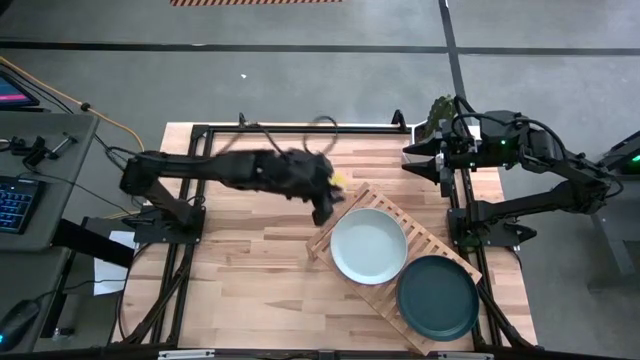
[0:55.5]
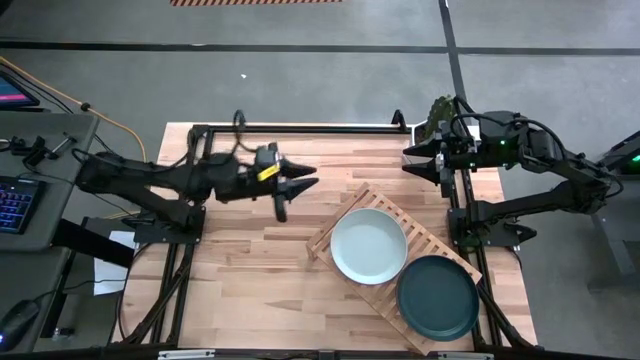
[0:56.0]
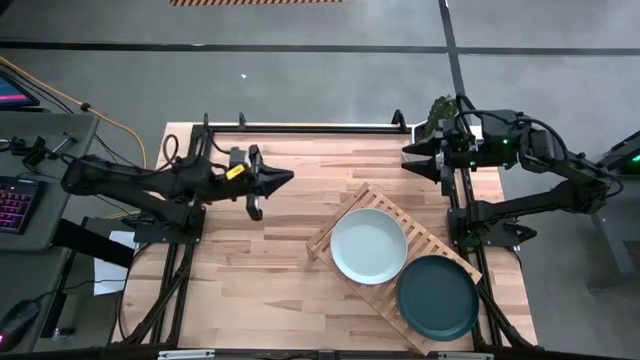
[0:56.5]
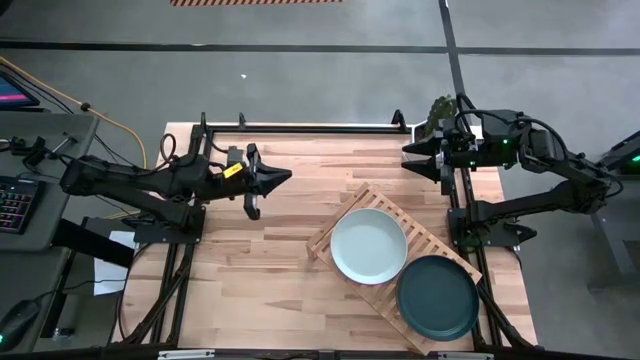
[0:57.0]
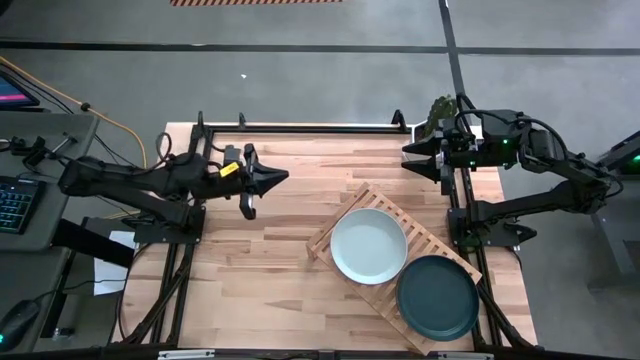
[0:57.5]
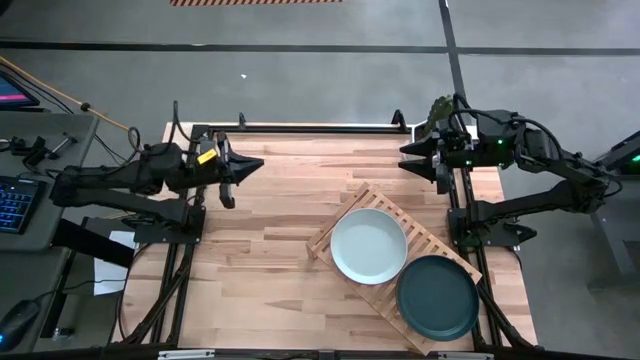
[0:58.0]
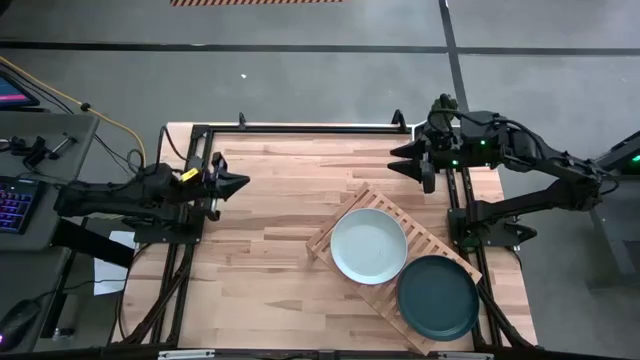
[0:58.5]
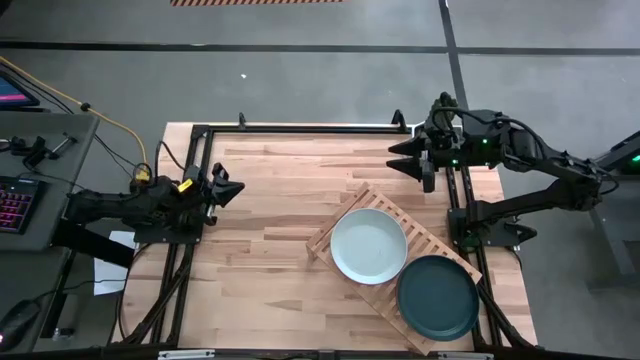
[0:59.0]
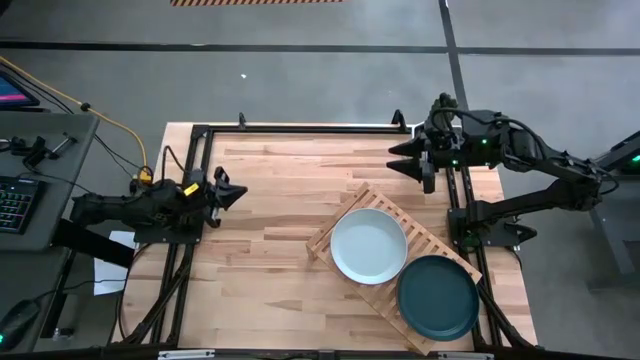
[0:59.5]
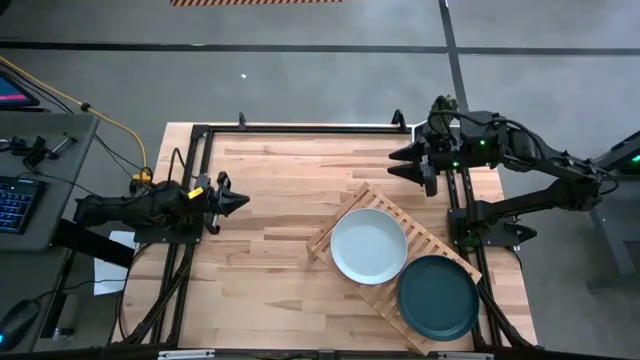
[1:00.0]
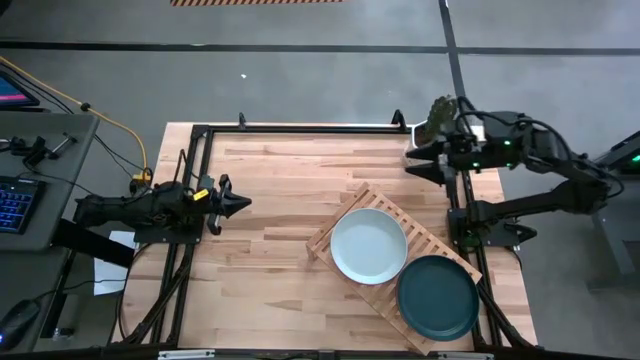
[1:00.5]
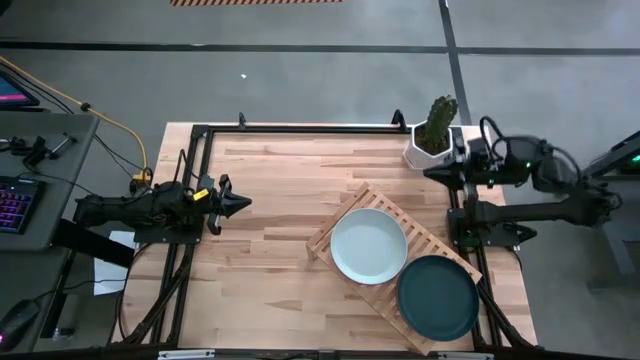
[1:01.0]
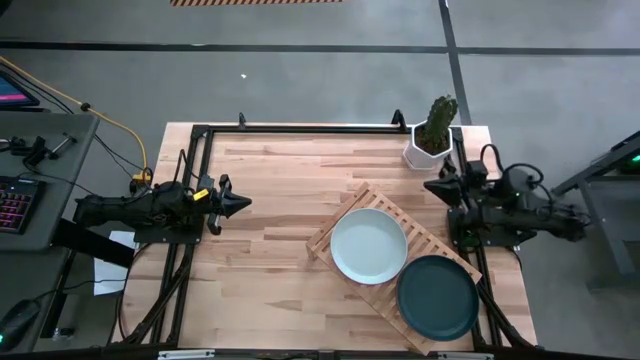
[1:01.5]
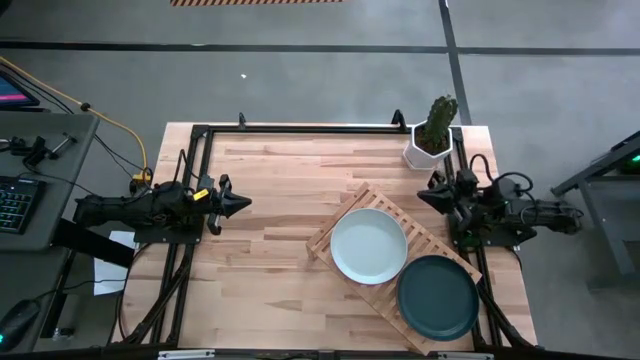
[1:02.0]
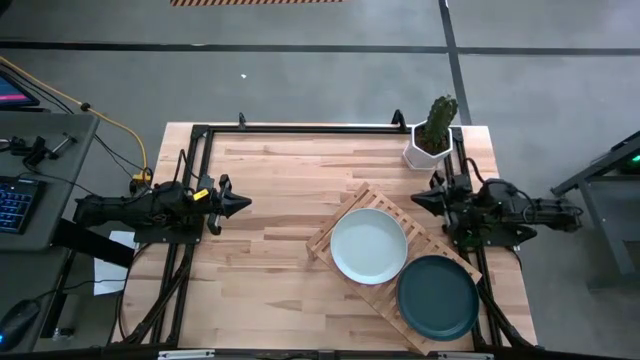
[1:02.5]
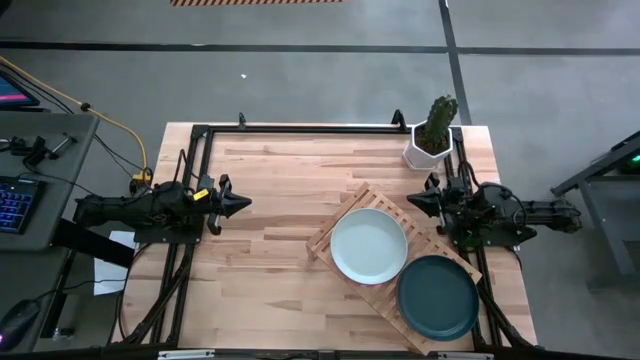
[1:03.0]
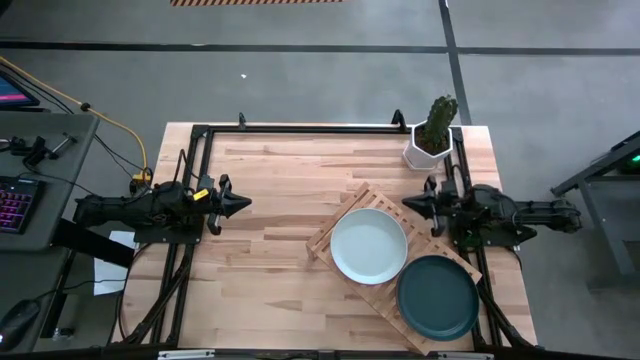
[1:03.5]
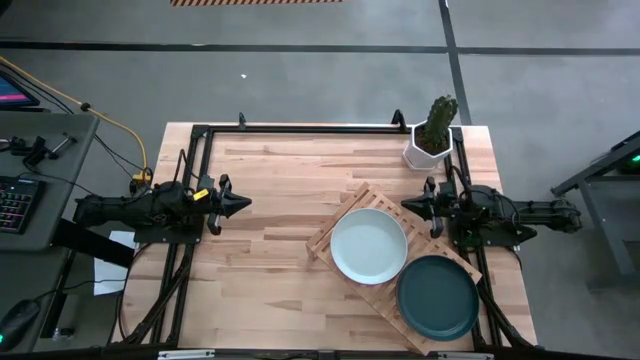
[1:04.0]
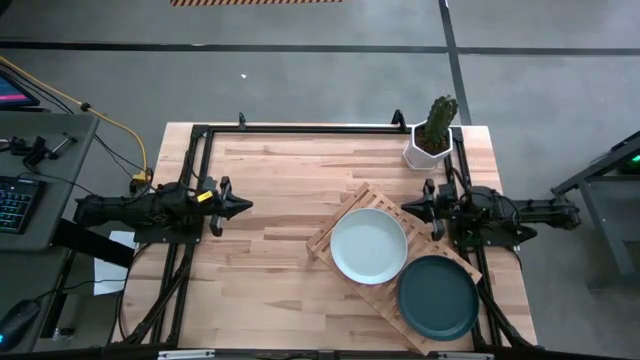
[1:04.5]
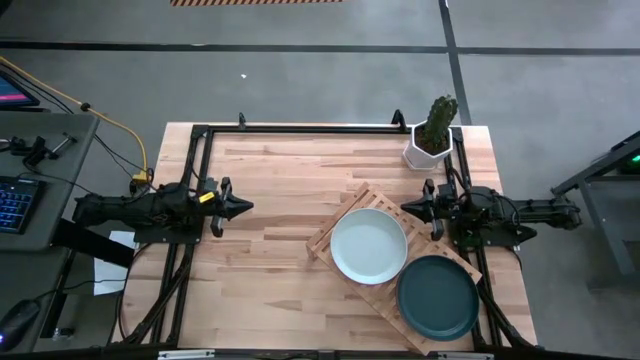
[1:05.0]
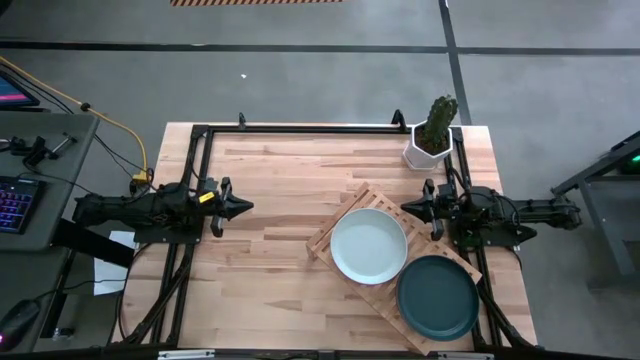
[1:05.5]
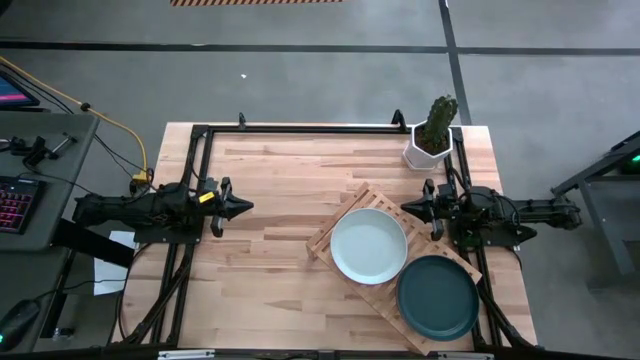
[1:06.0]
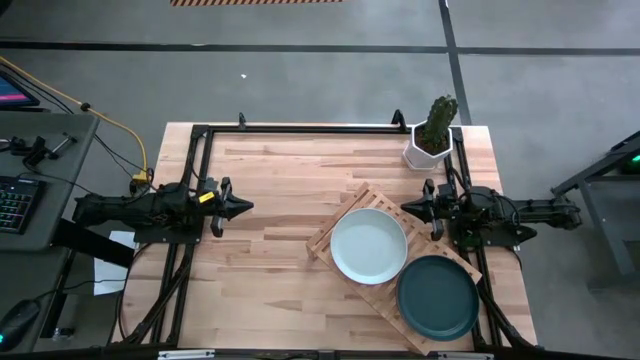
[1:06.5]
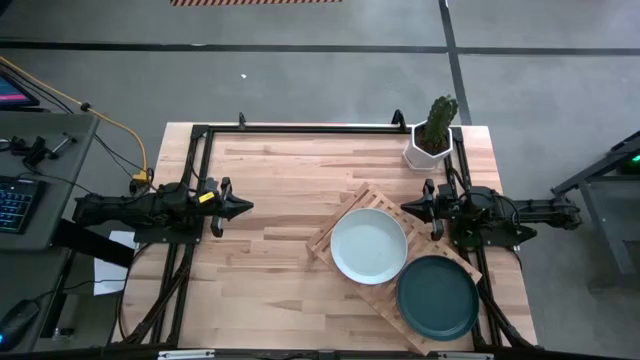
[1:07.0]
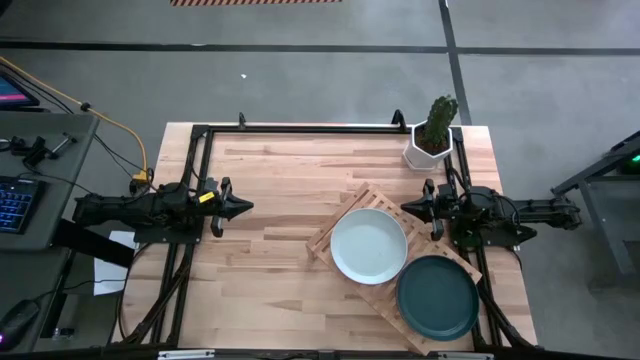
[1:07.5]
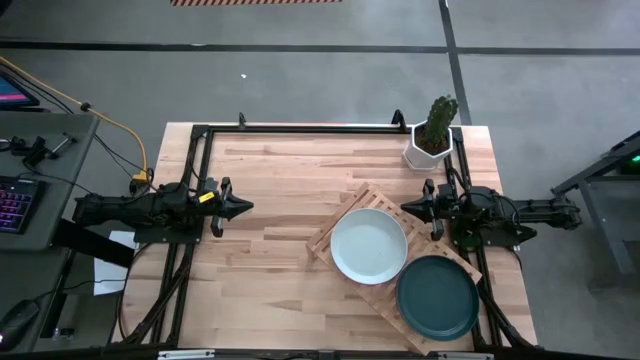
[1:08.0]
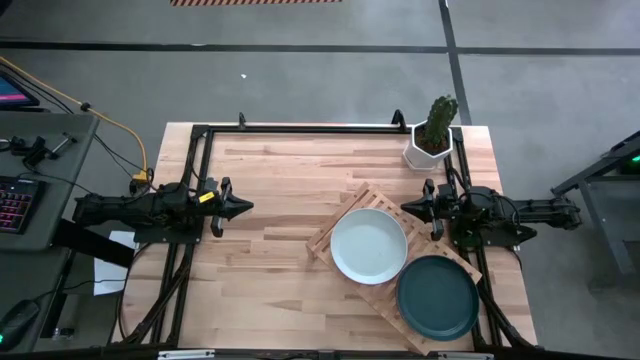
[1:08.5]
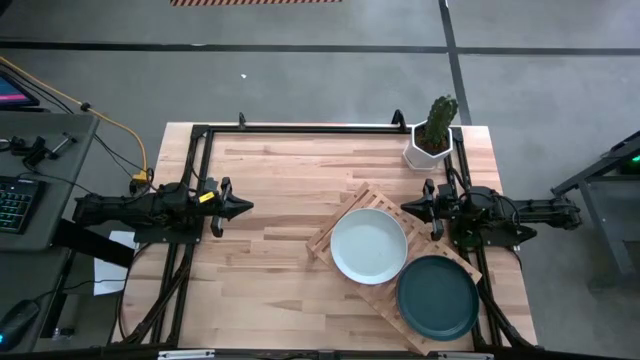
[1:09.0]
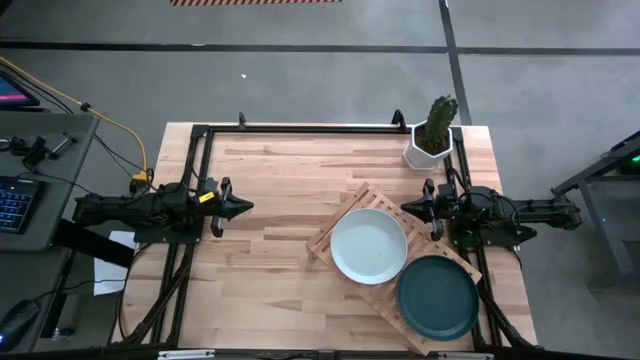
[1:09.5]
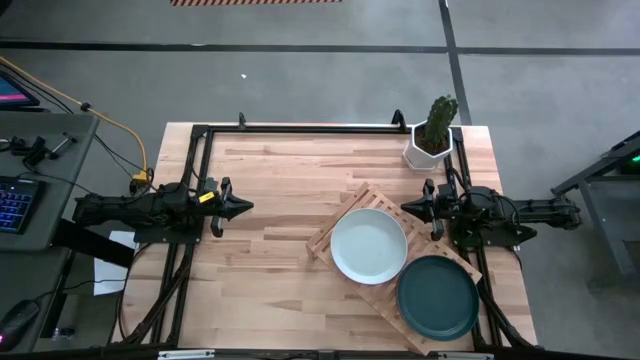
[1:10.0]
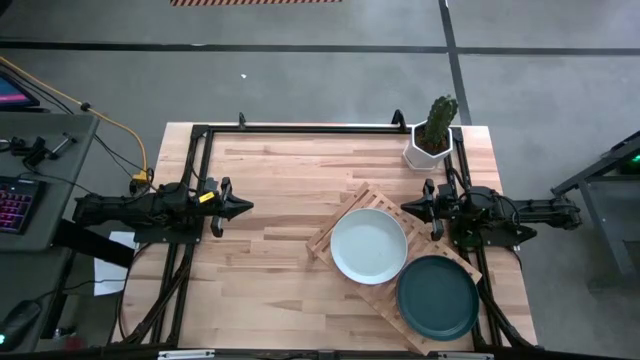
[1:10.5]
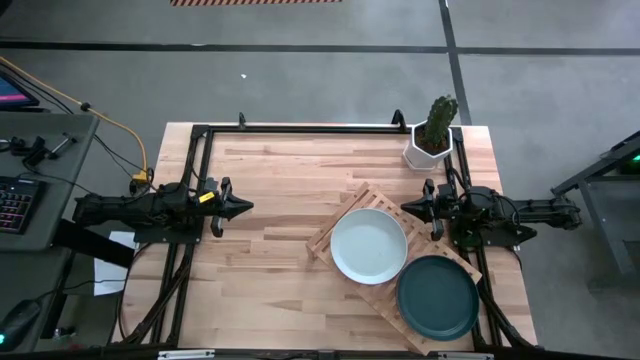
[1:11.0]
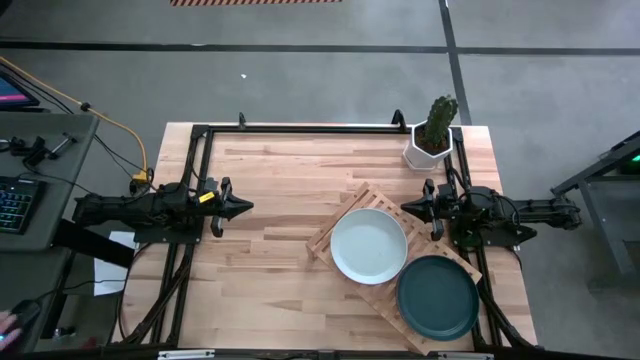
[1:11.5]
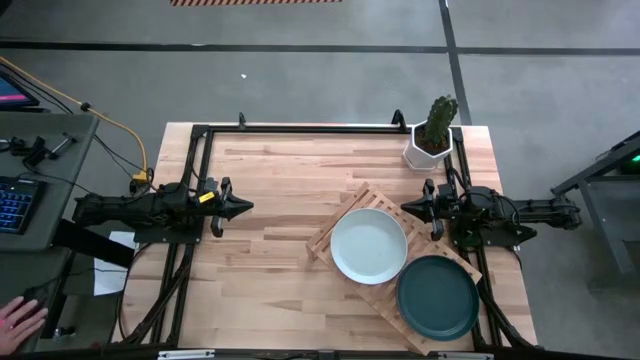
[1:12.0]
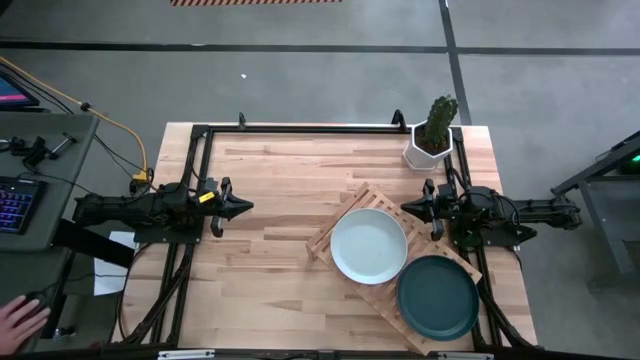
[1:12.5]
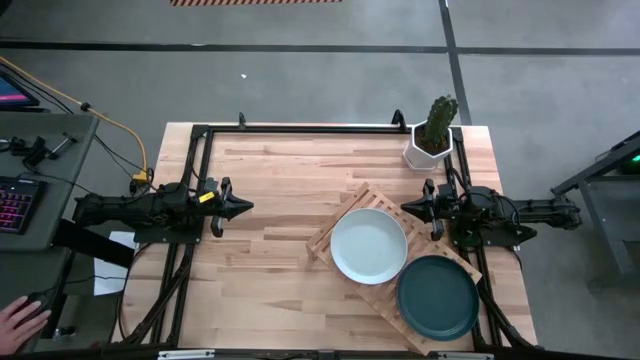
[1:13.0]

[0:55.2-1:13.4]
Task: Place and stack plates onto a shelf
Return to Home Position

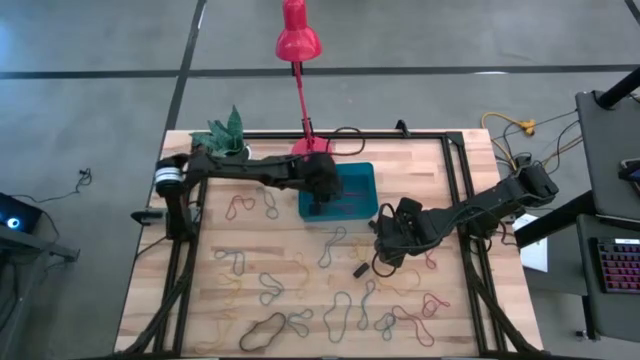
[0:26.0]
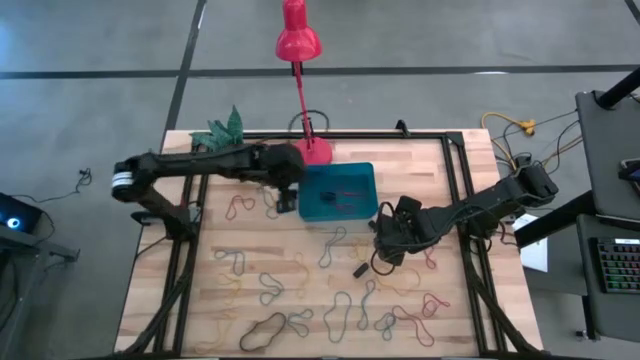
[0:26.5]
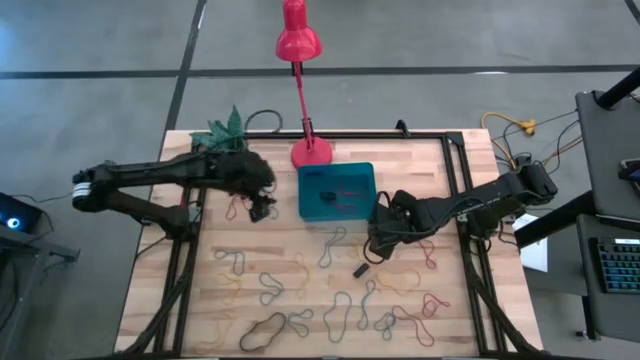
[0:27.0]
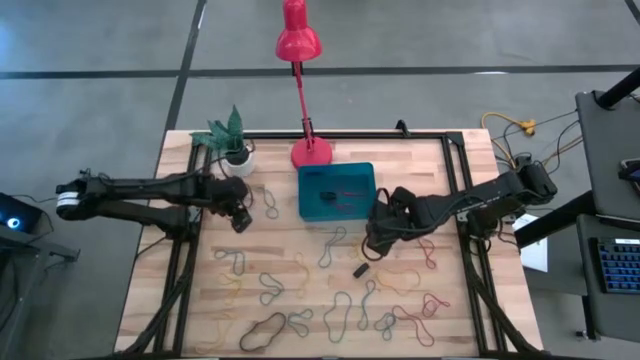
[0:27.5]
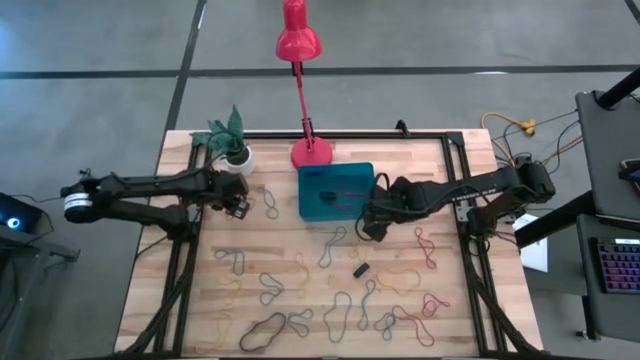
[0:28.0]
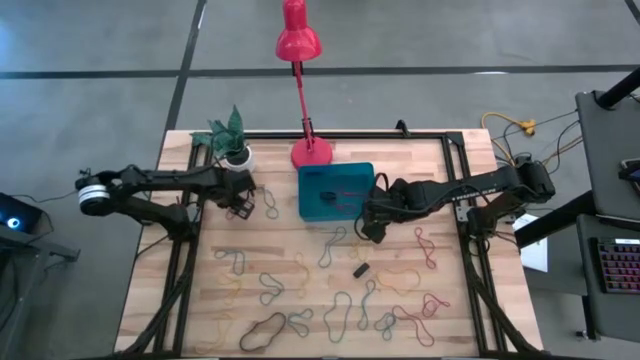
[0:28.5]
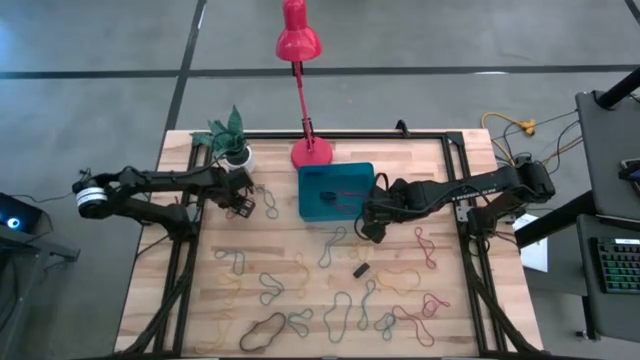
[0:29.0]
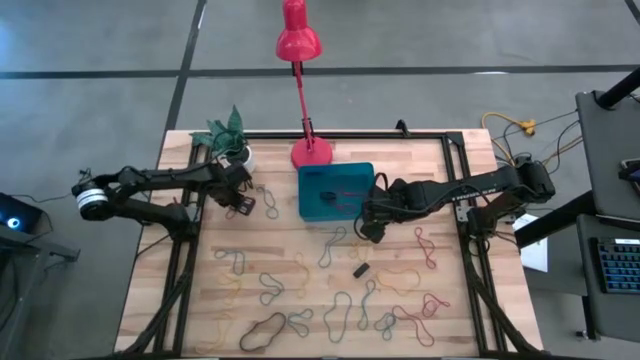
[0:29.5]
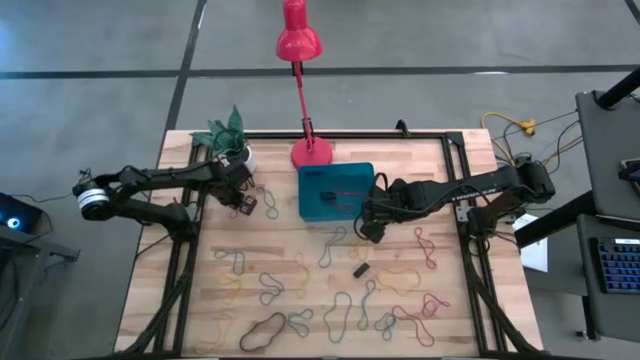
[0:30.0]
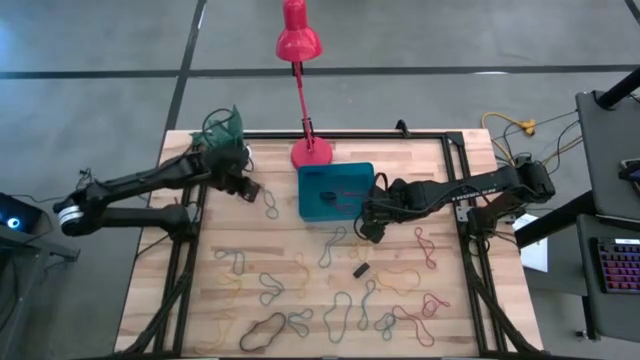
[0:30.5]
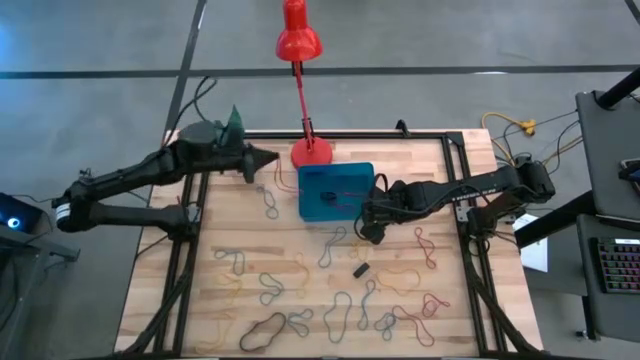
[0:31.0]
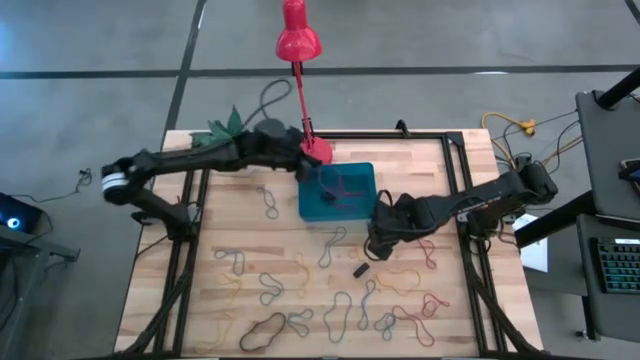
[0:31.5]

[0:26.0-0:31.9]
Task: Pick and place rubber bands into bin
Put the red rubber band into the blue bin
